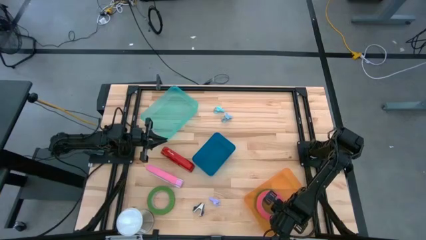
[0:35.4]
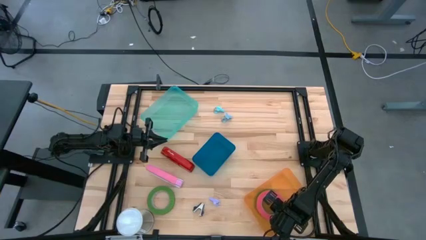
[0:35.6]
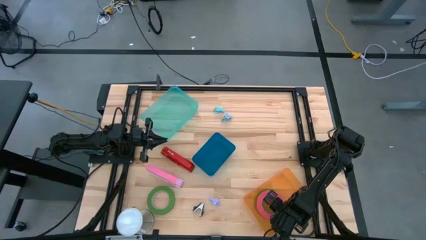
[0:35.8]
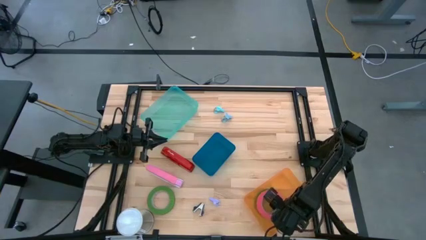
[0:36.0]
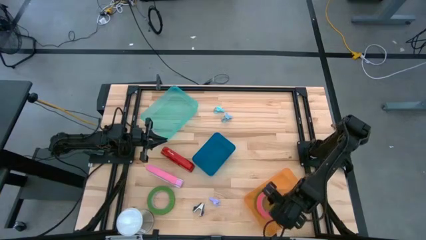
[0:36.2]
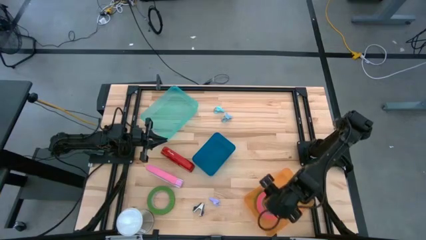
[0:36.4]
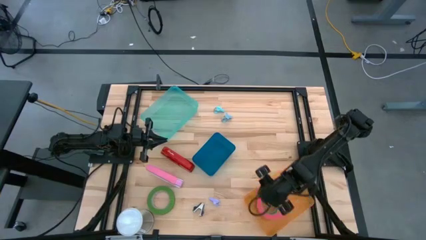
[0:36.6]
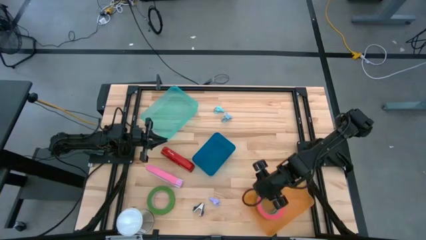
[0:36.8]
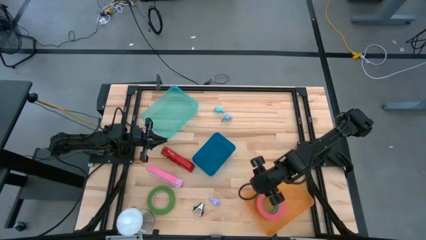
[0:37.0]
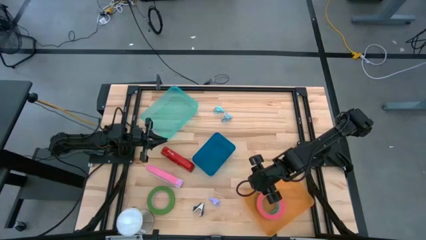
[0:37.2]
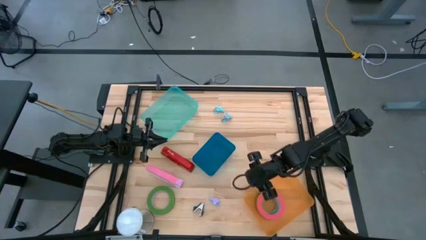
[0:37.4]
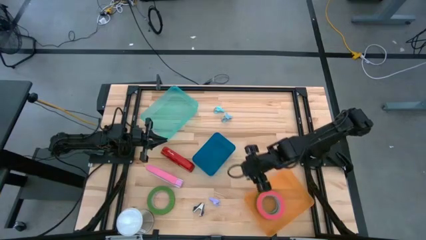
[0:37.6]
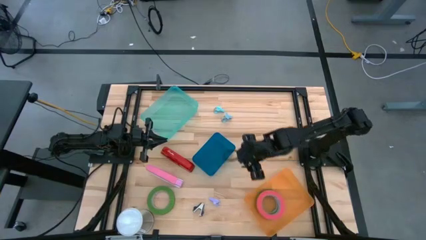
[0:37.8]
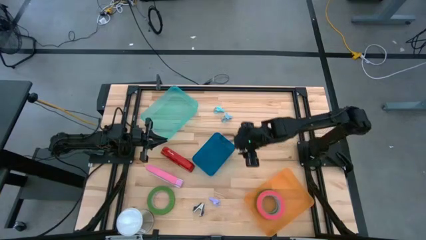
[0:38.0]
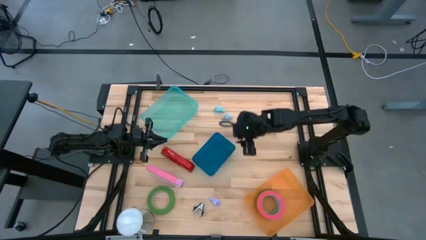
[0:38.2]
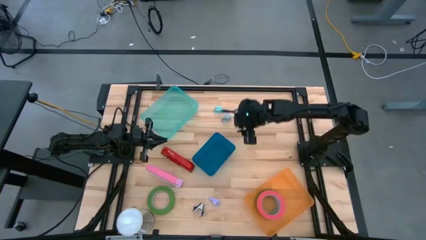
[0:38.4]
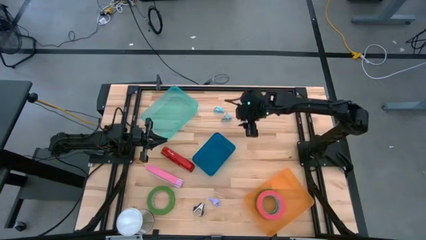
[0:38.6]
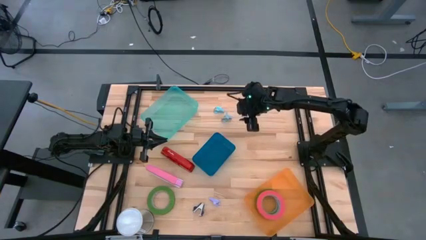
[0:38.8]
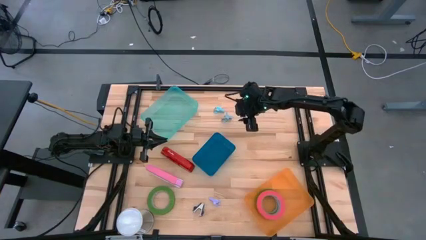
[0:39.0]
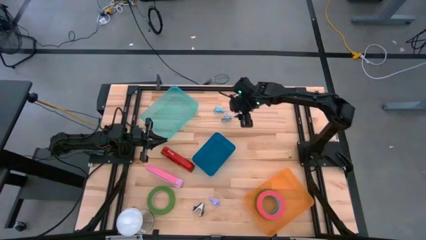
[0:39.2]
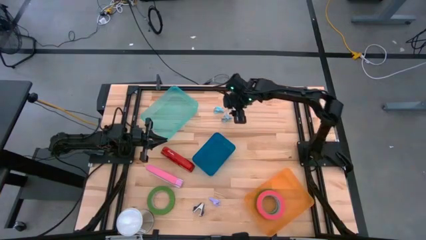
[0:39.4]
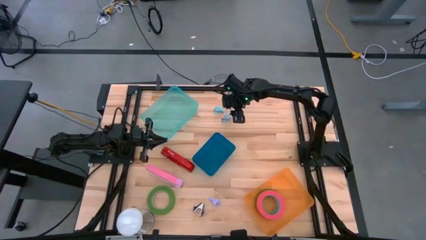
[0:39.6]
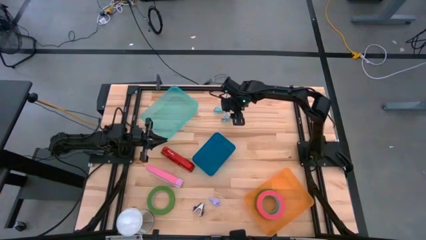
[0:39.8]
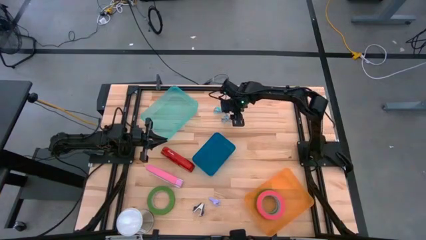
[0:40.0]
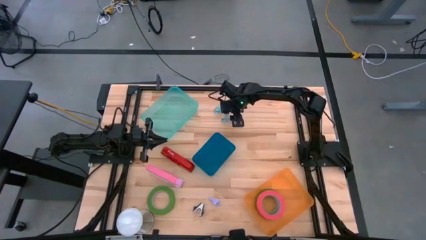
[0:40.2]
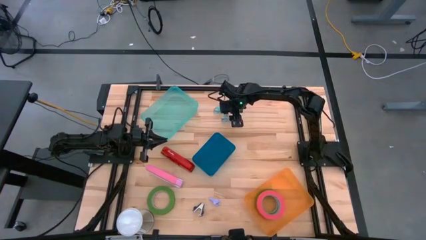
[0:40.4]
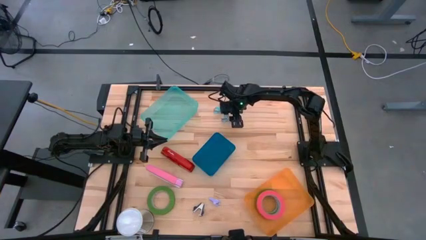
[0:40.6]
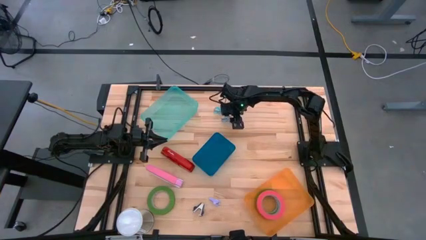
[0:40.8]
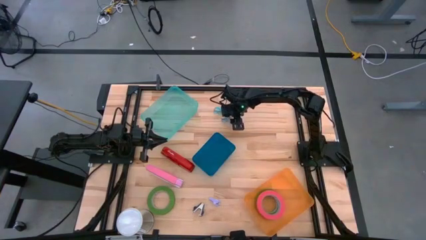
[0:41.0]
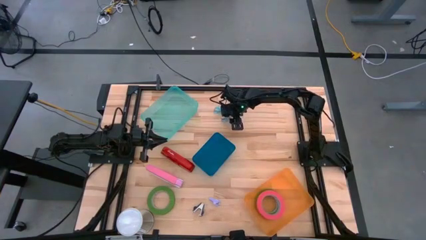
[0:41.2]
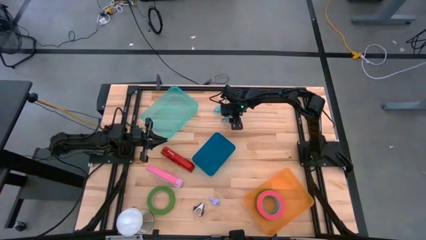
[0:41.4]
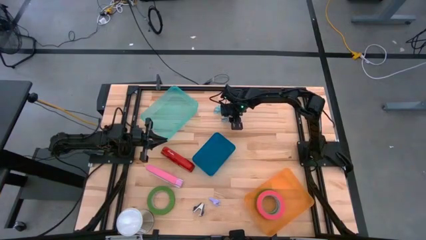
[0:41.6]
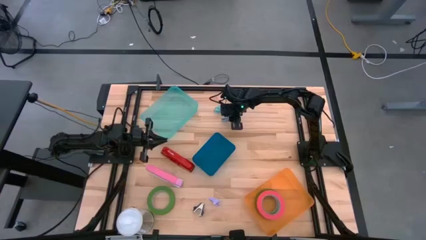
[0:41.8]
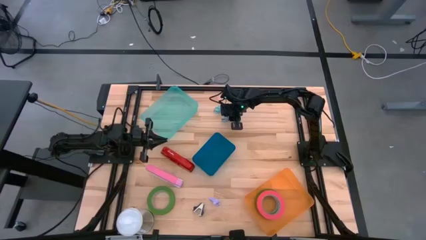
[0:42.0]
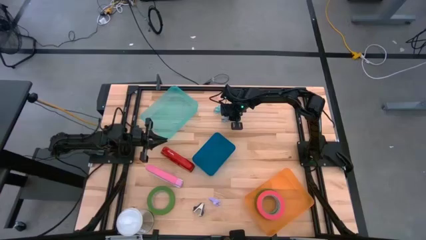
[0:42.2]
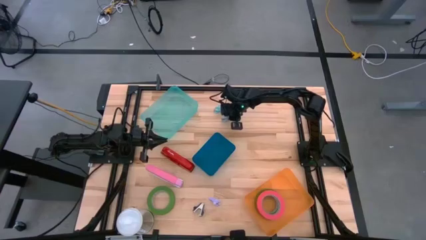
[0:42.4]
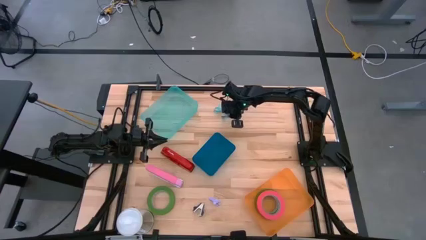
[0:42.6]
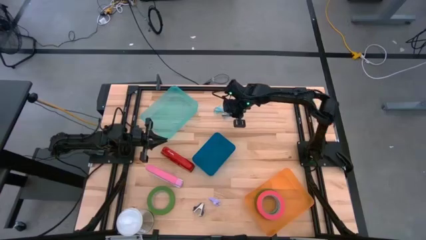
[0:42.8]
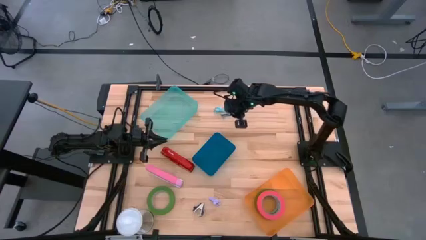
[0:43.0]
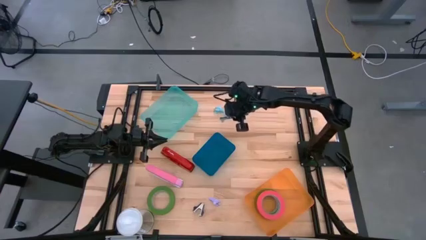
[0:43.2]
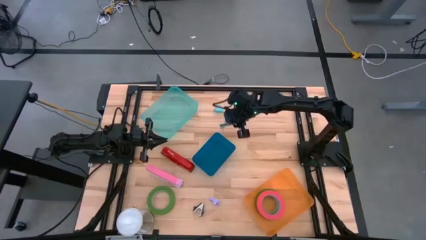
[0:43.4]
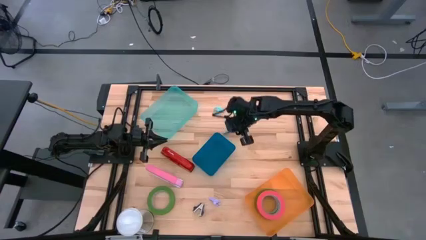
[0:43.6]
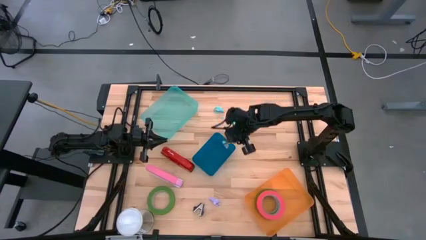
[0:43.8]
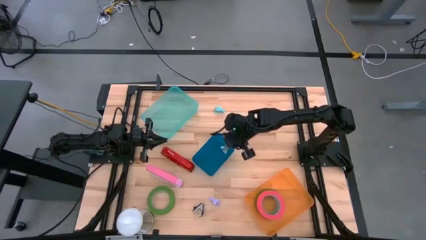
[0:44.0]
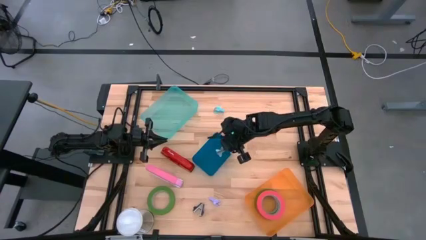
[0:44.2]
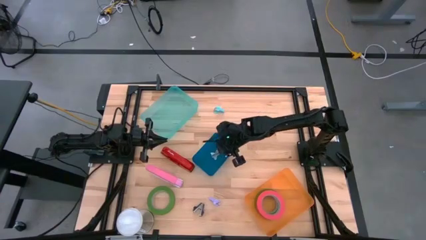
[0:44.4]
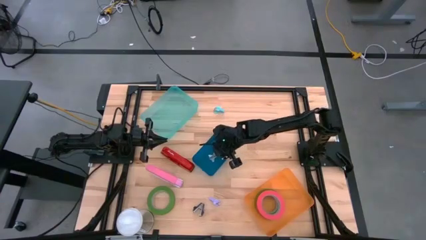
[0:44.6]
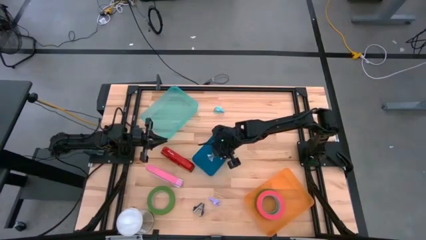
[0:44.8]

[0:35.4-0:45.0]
Task: Pick and place Stapler, Stapler remover, tape
Put the blue staple remover into the blue bin

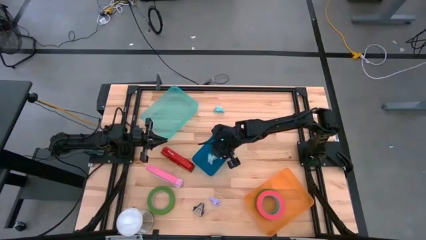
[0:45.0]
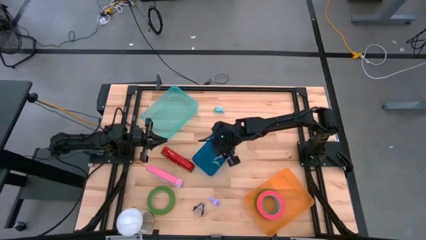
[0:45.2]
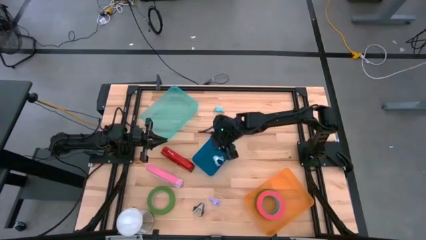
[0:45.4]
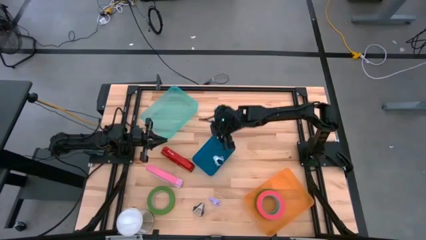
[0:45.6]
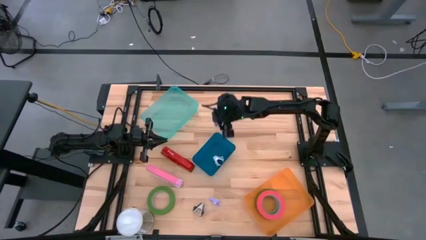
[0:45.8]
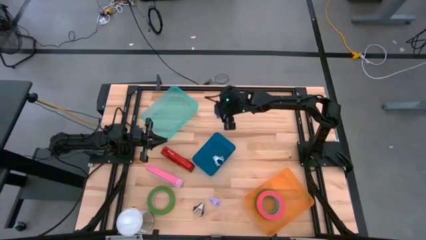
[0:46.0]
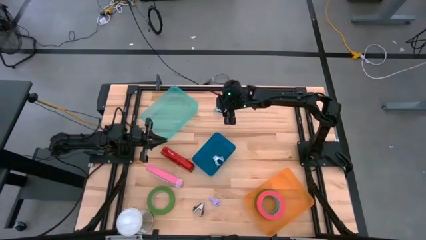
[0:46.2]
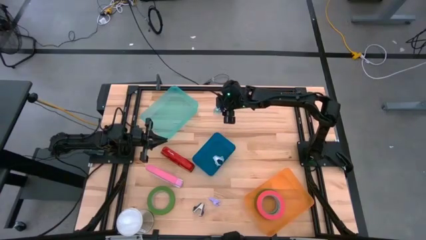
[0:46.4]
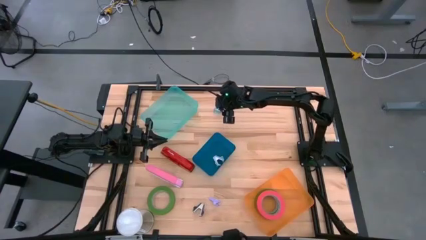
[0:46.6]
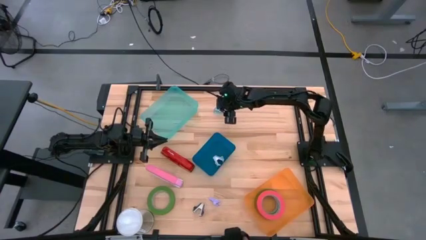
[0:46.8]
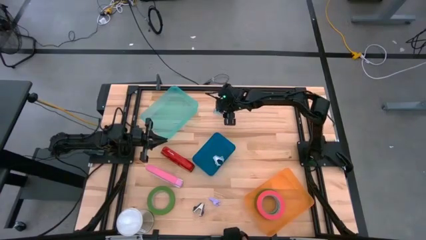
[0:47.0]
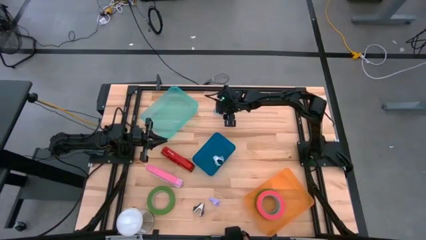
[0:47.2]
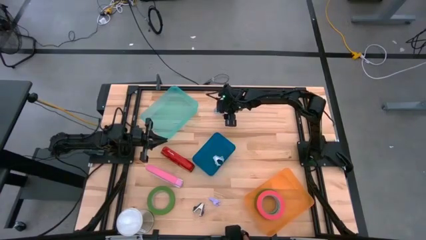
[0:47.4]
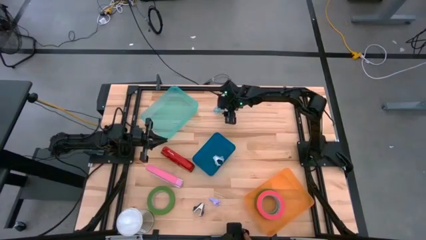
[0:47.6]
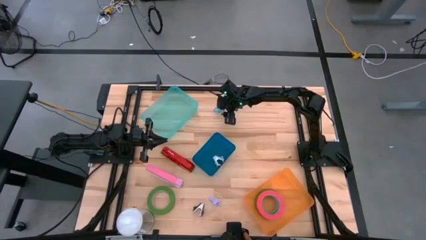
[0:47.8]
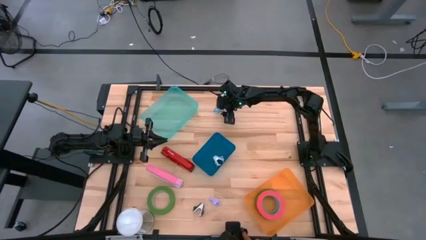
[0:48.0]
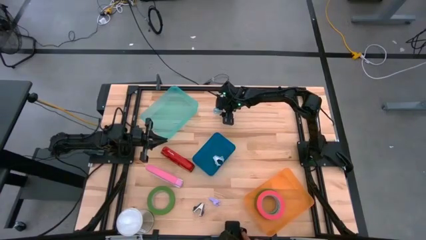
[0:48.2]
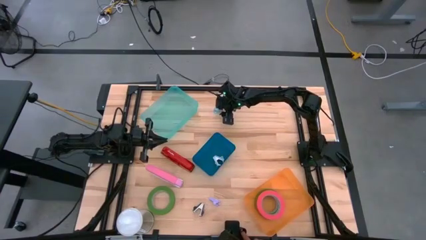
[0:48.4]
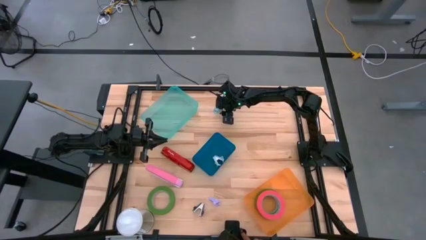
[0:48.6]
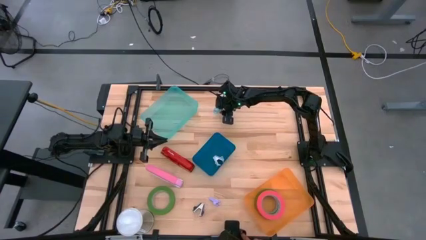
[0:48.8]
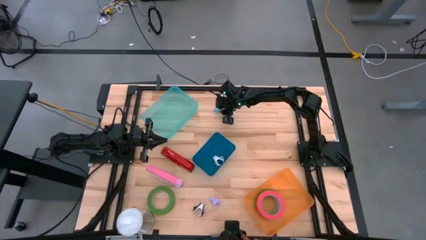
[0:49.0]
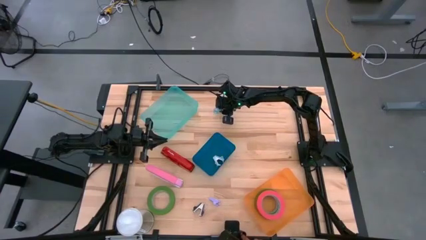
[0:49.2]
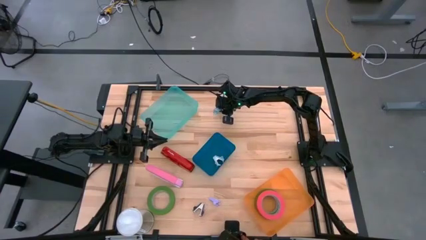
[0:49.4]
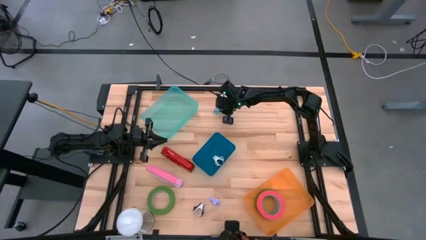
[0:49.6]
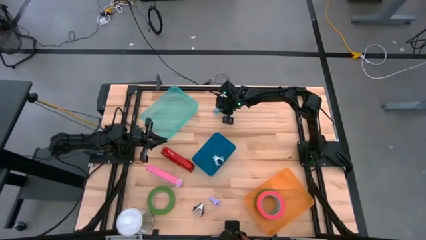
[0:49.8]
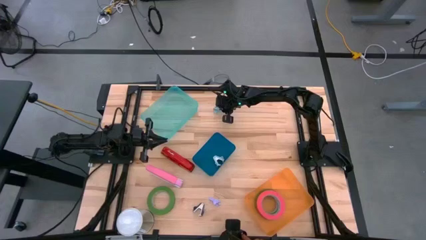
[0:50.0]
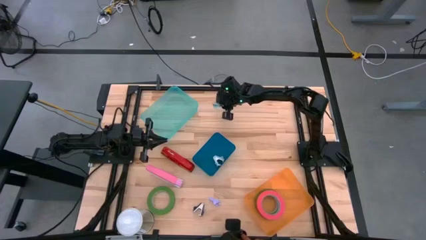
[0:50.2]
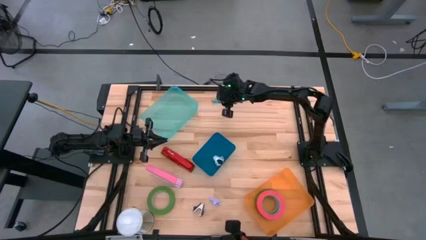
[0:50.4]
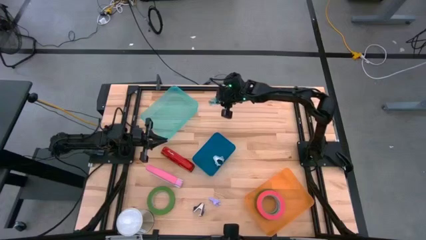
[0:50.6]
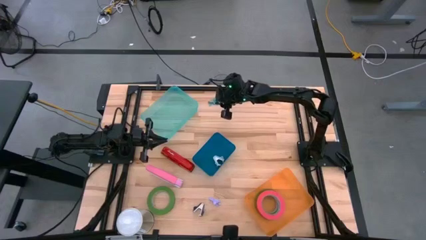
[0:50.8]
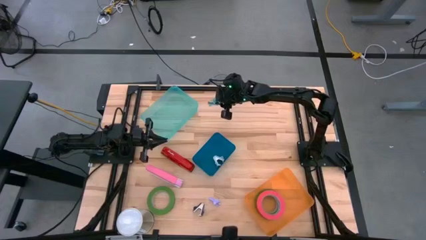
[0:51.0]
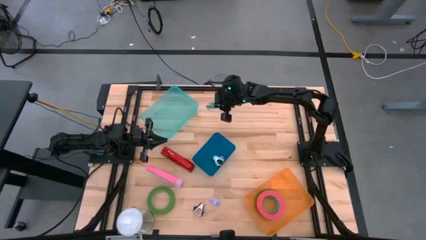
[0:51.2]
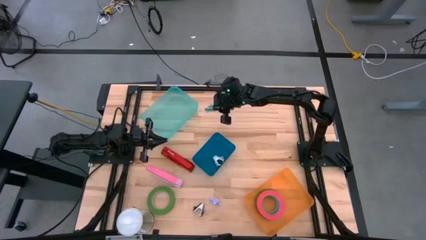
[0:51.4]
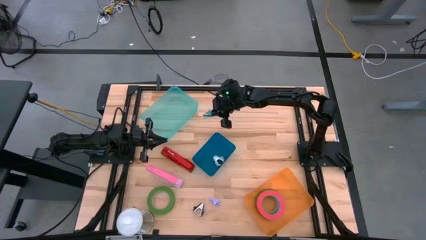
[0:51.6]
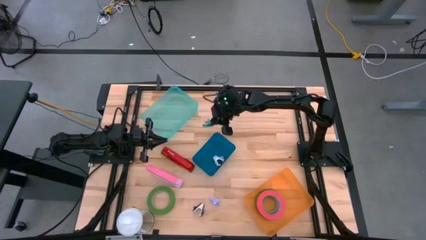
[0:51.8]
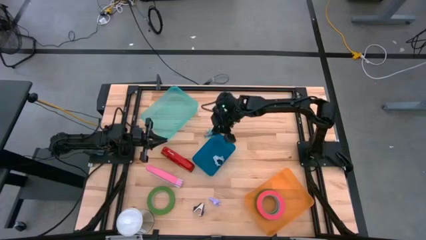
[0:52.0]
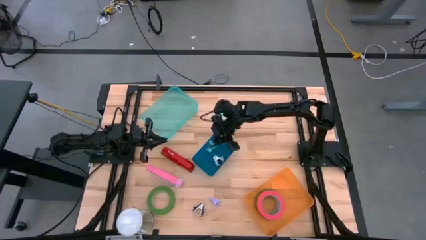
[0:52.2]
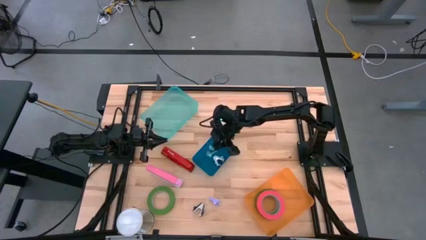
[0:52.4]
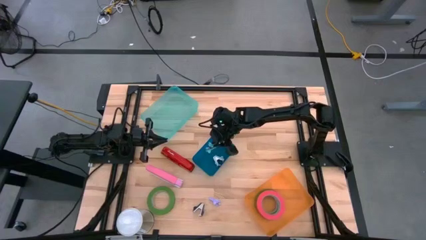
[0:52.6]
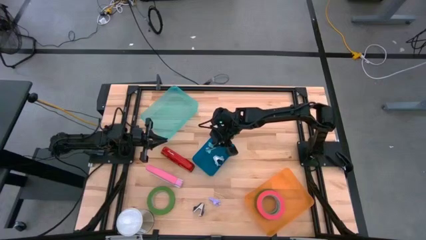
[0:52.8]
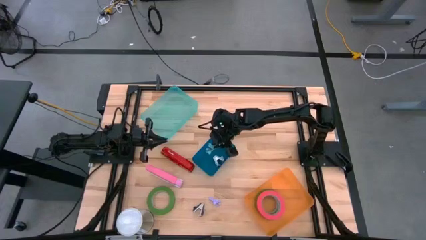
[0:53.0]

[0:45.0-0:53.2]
Put the light blue staple remover into the blue bin
